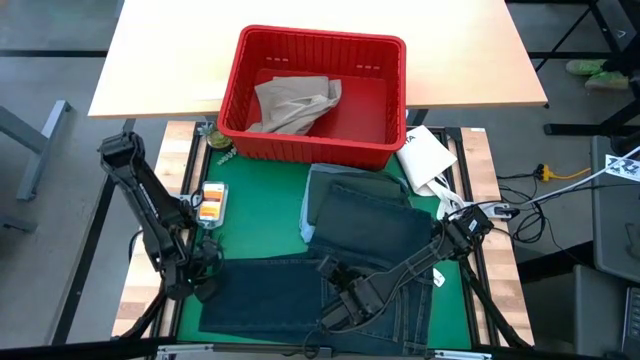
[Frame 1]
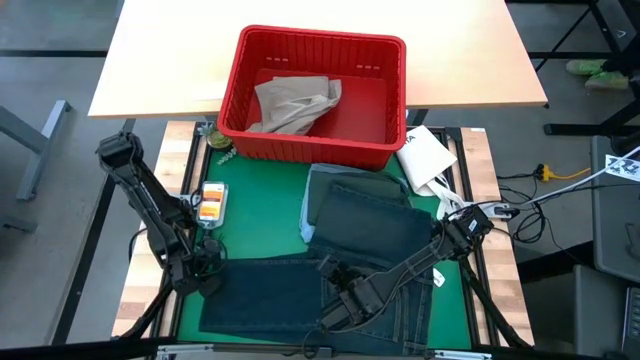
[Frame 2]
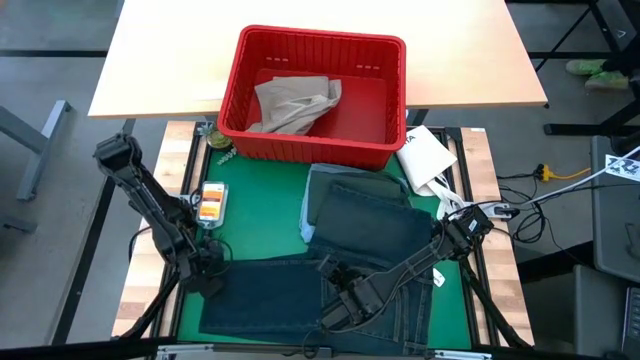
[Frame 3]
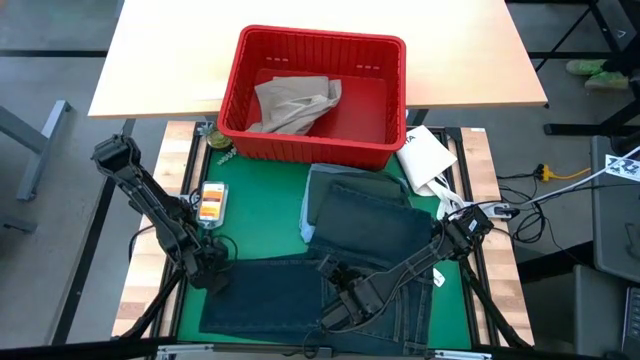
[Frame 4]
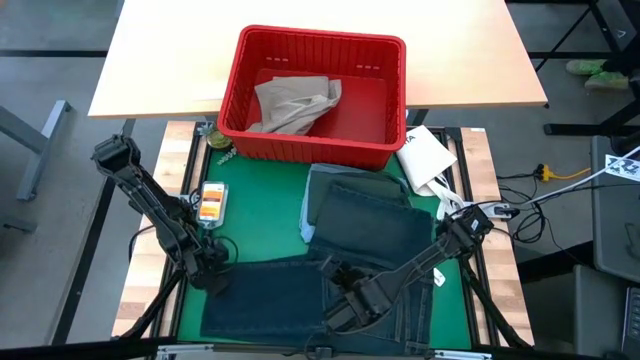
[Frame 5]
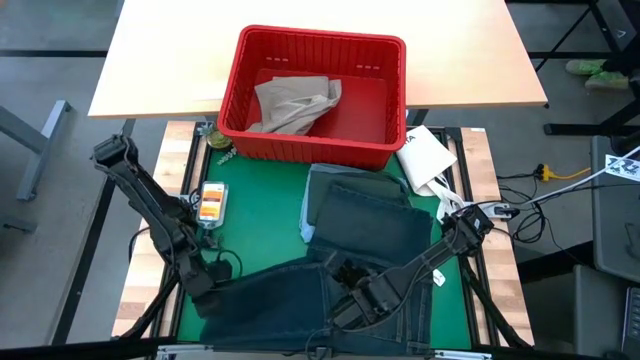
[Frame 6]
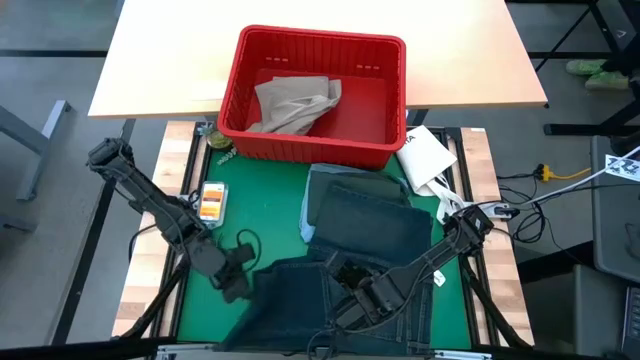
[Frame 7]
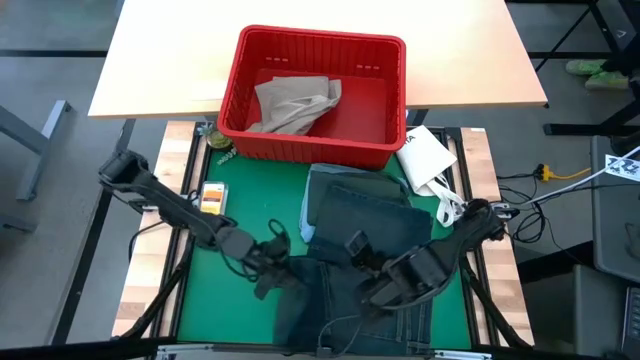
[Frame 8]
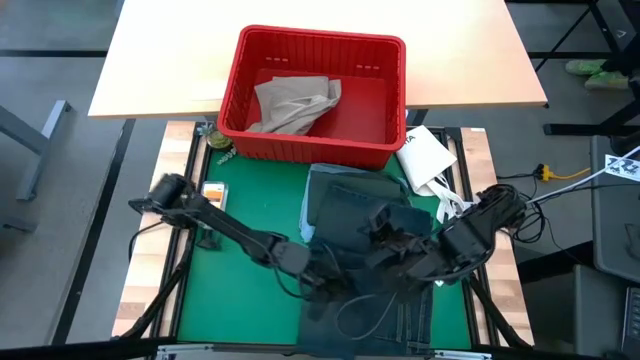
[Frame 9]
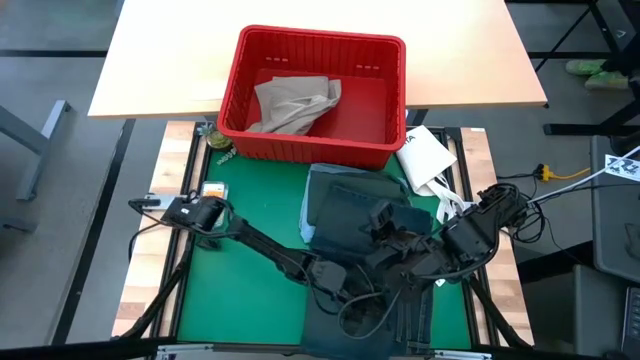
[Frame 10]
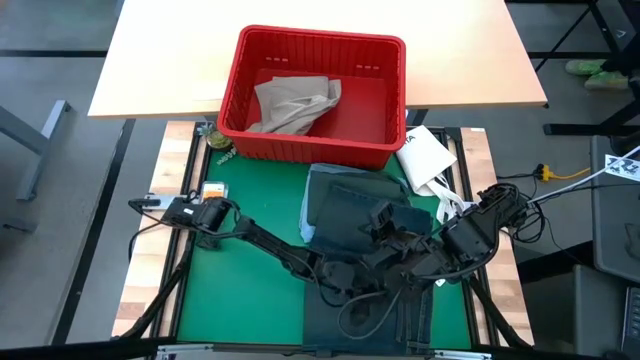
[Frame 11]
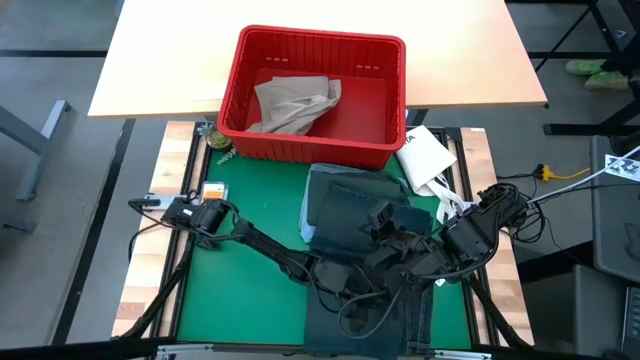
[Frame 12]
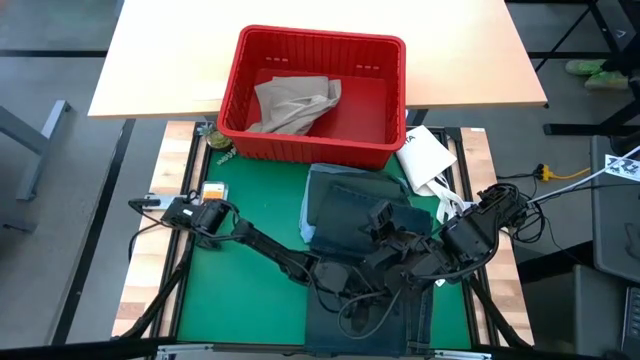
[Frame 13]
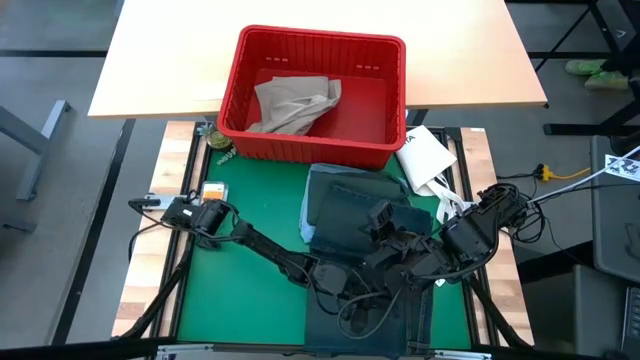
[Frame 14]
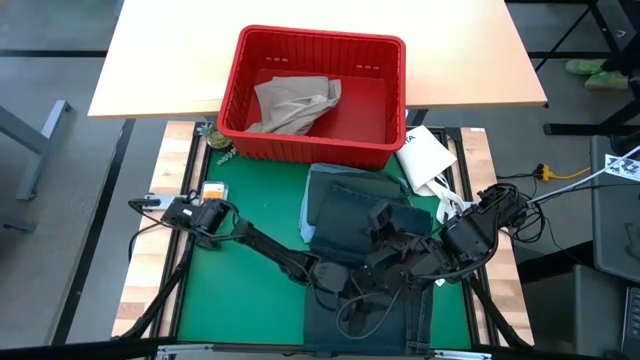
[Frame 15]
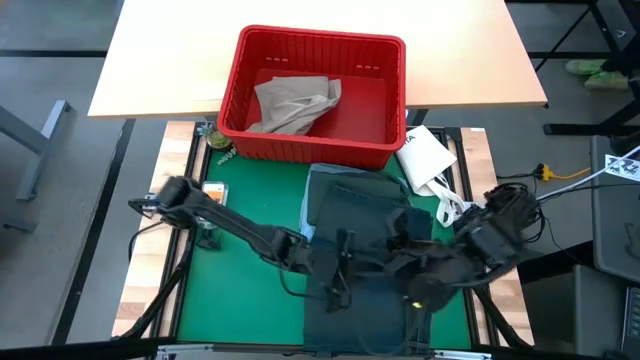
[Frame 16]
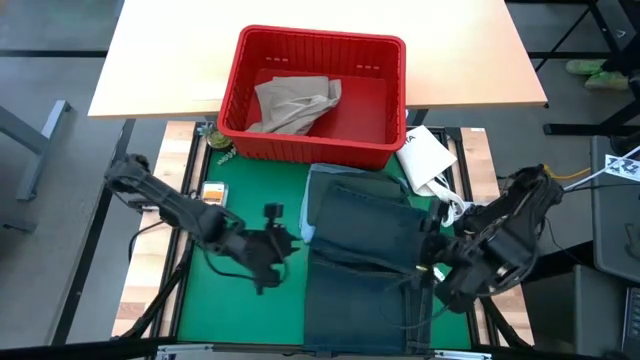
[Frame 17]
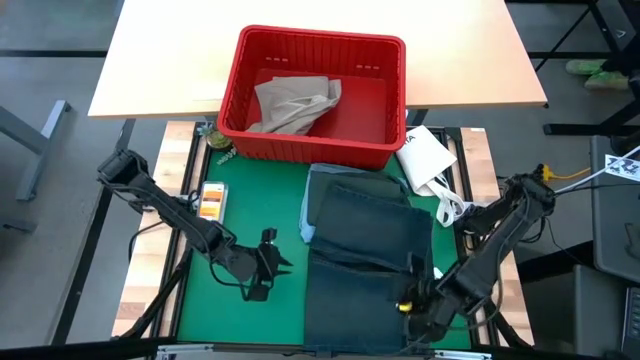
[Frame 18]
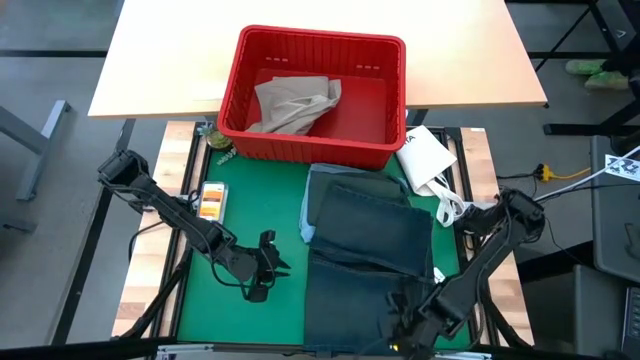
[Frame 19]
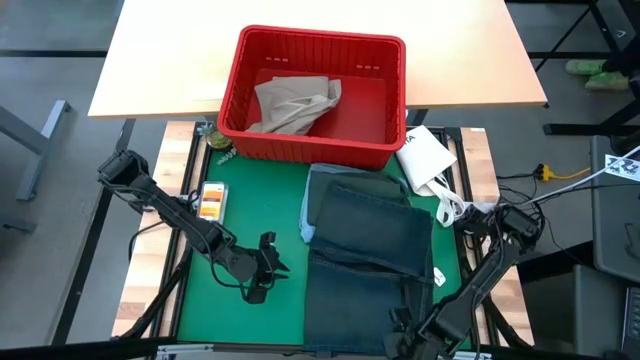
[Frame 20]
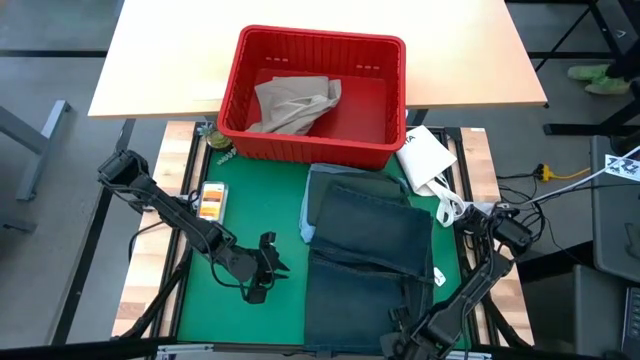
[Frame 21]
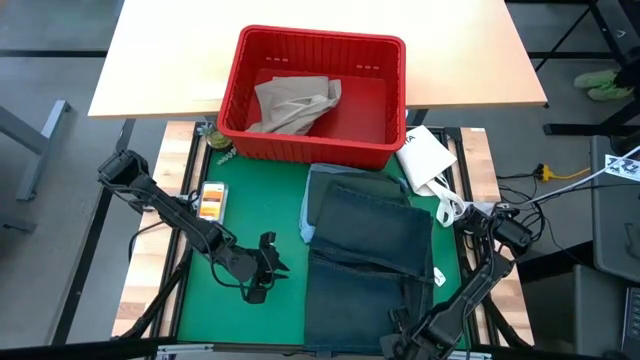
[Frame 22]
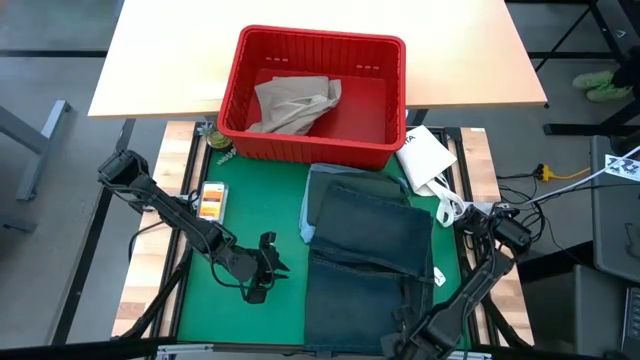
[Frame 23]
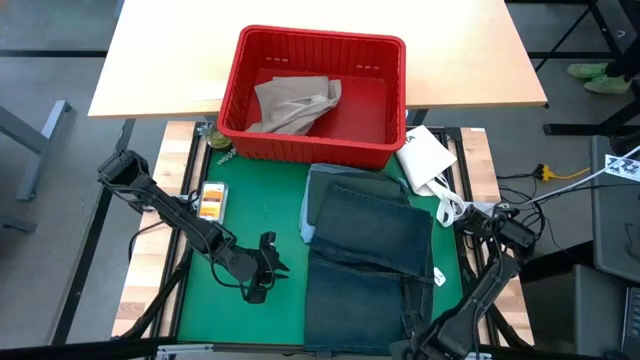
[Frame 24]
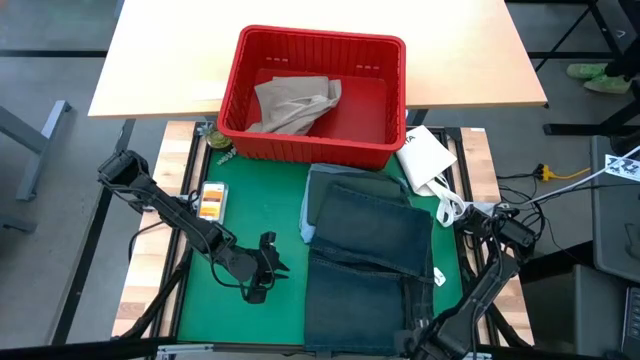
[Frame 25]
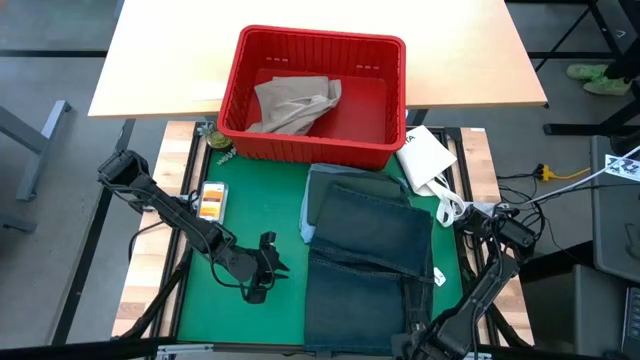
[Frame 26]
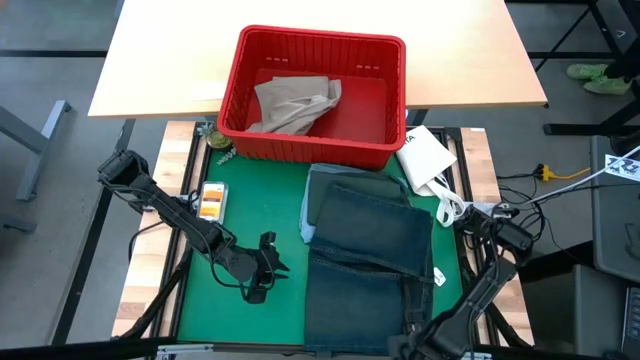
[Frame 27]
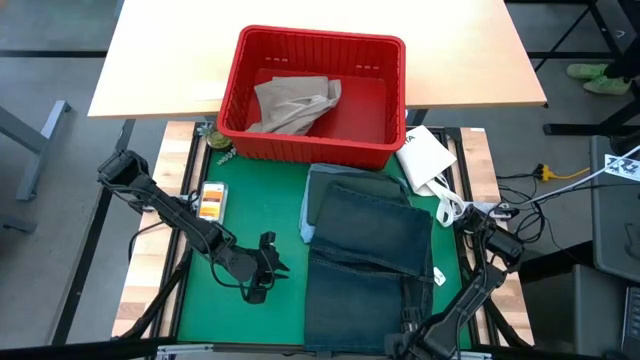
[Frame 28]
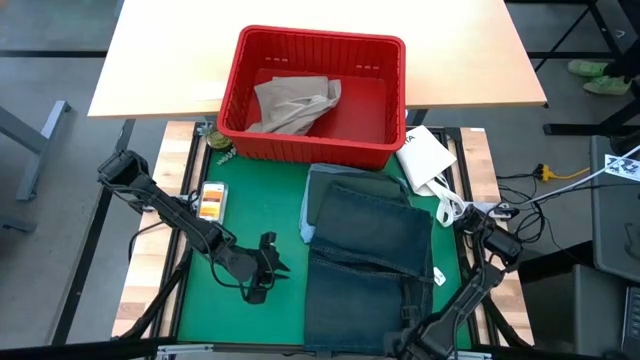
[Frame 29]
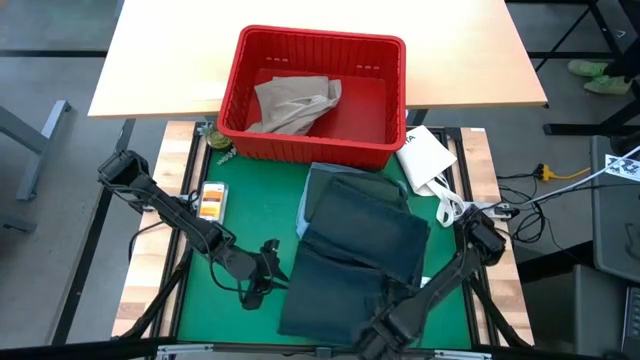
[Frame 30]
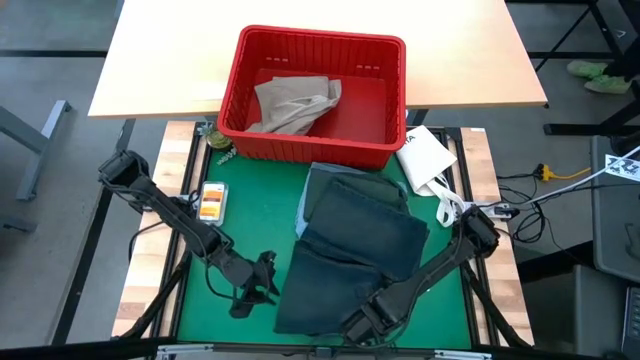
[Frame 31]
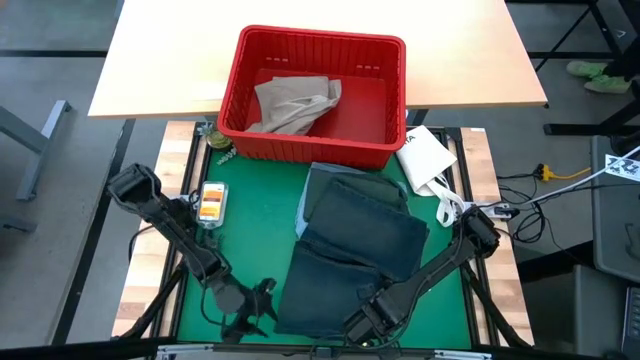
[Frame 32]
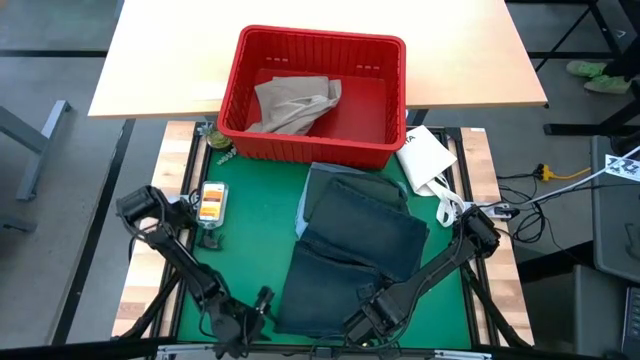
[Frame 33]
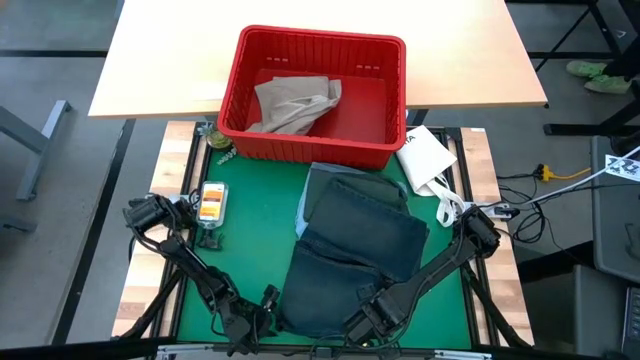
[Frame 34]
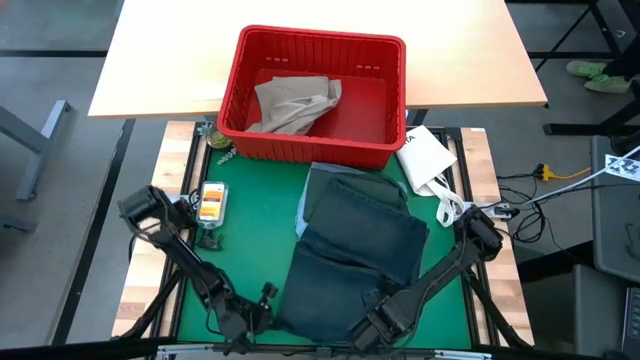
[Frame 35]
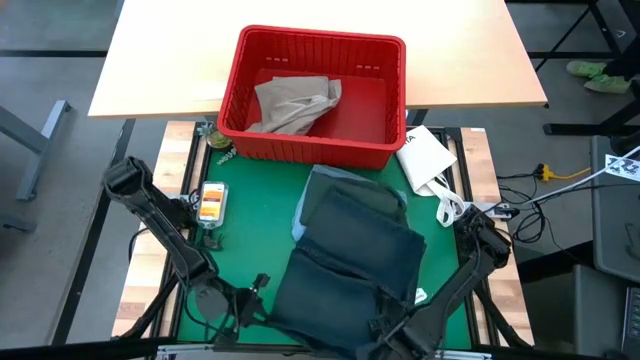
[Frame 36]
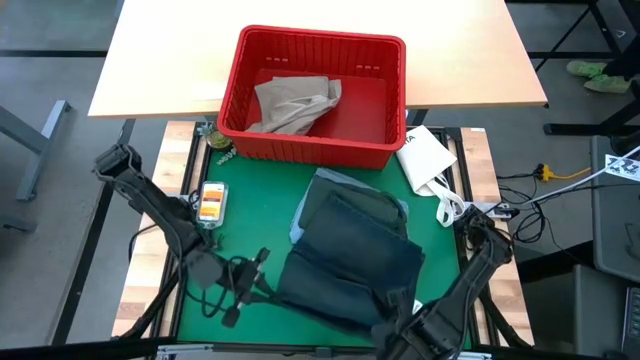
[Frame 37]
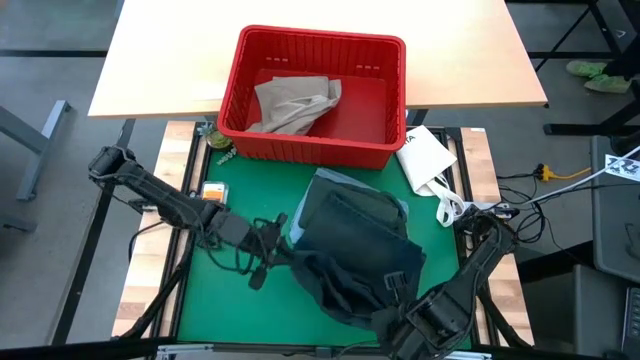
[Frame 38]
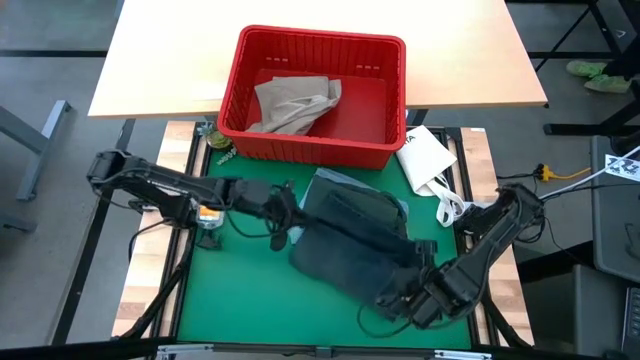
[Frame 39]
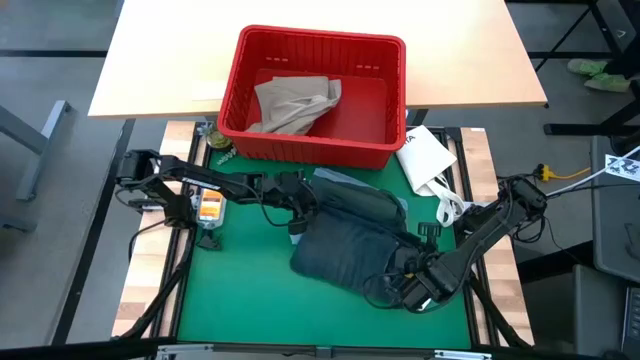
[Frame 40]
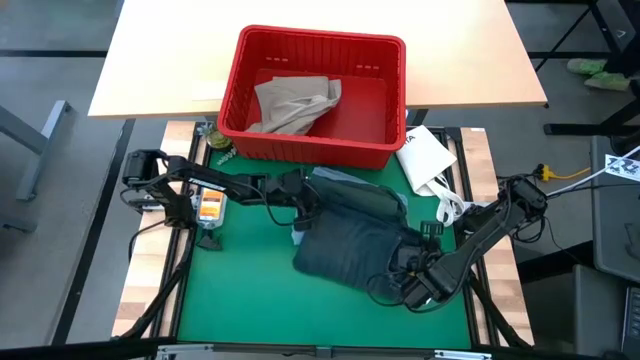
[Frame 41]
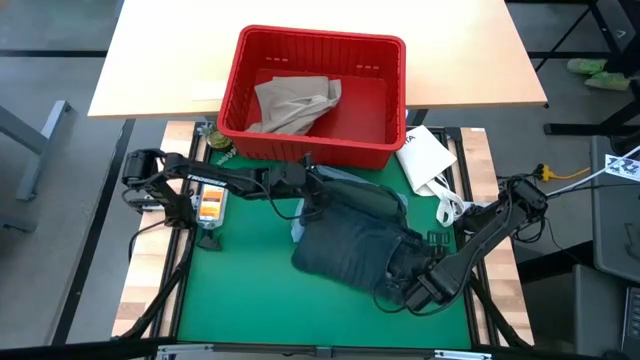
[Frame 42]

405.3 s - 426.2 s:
Task: Fold Laundry from Bin
Fold the dark blue pants
